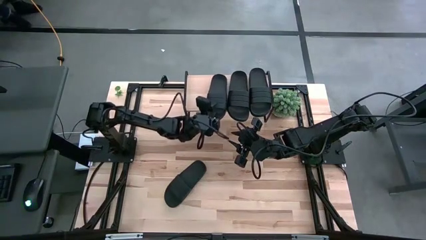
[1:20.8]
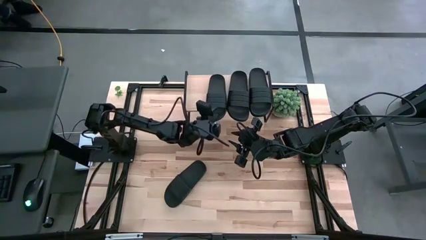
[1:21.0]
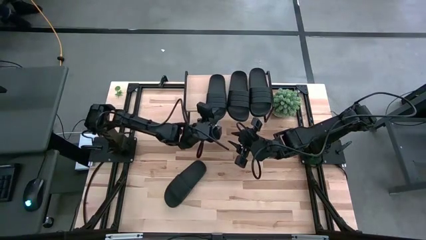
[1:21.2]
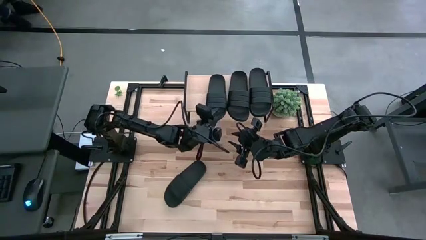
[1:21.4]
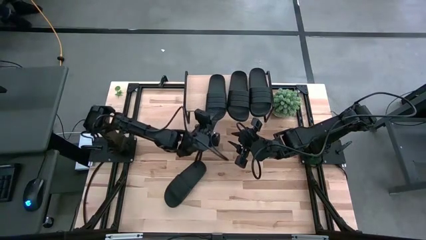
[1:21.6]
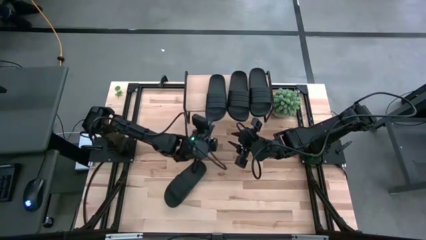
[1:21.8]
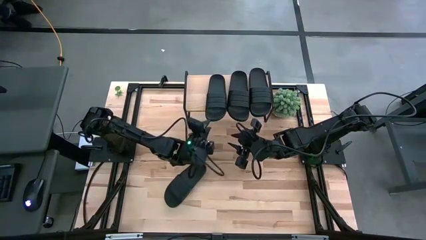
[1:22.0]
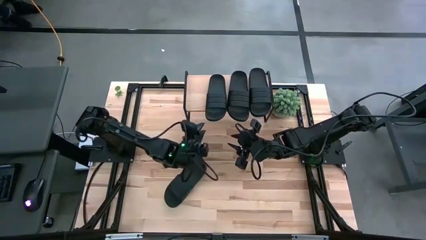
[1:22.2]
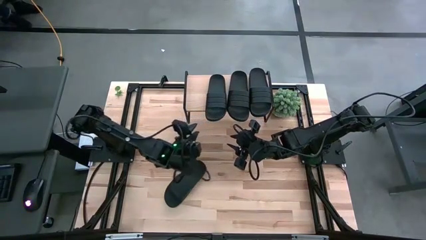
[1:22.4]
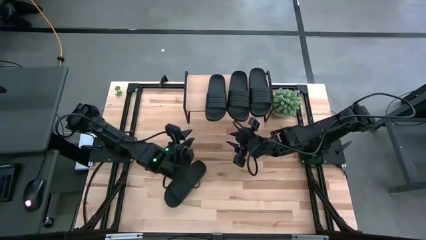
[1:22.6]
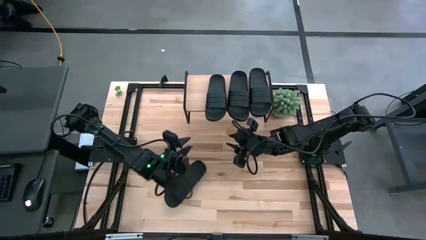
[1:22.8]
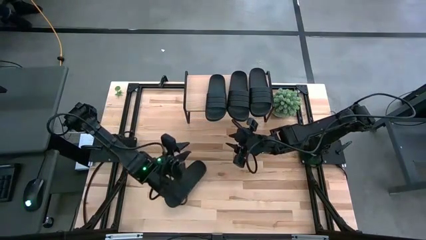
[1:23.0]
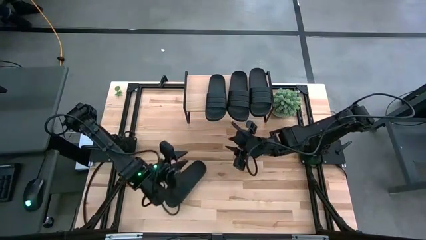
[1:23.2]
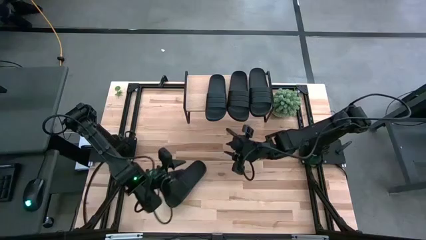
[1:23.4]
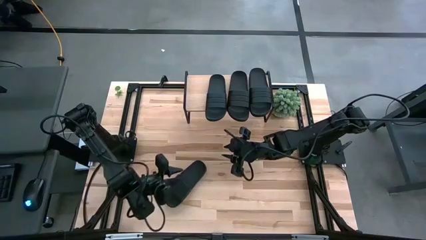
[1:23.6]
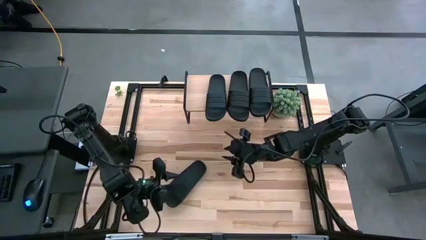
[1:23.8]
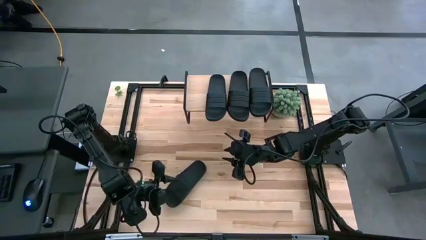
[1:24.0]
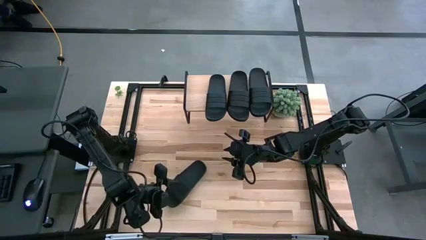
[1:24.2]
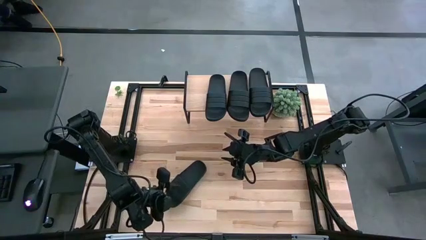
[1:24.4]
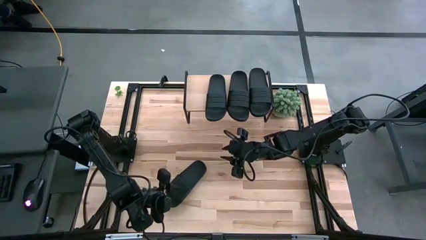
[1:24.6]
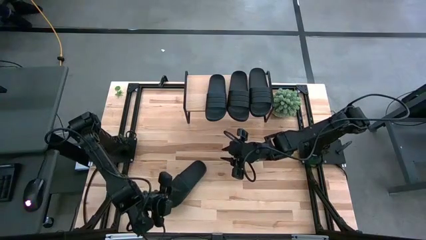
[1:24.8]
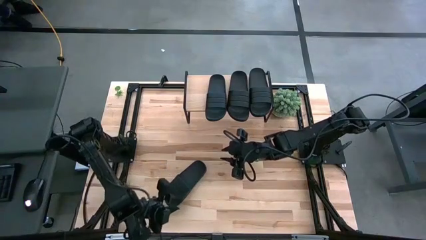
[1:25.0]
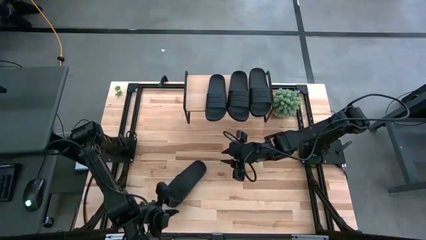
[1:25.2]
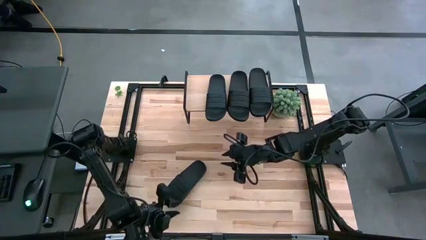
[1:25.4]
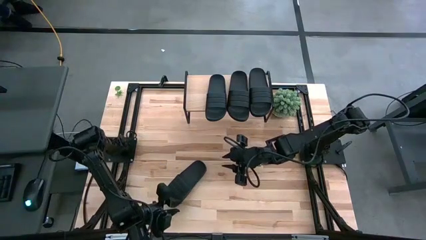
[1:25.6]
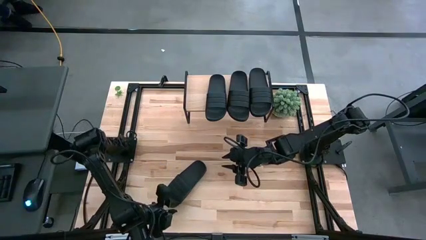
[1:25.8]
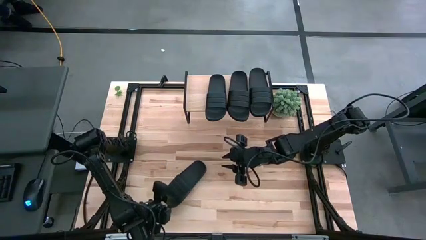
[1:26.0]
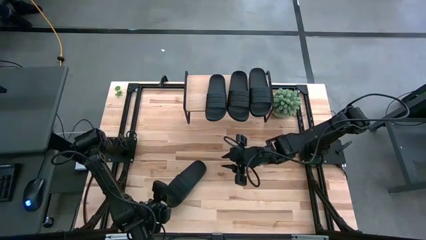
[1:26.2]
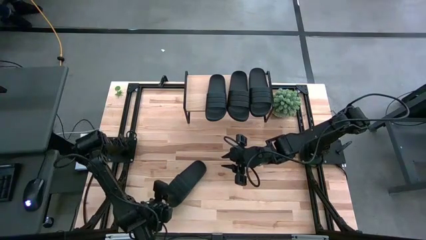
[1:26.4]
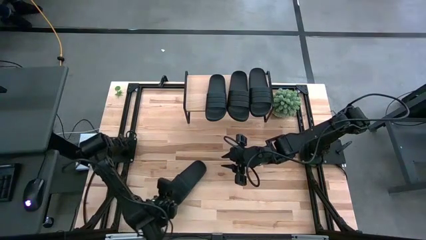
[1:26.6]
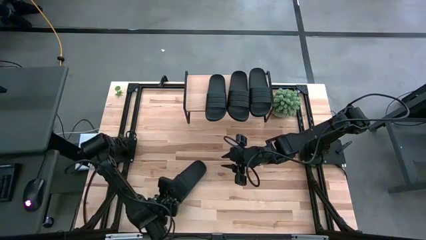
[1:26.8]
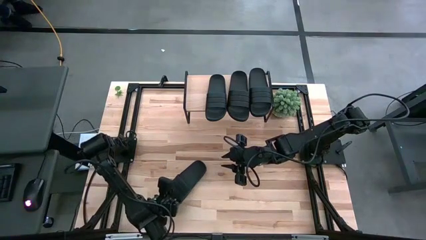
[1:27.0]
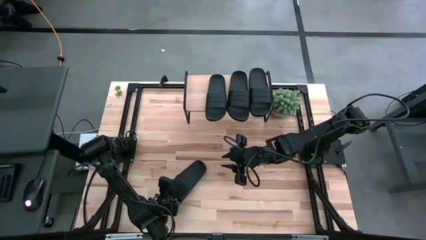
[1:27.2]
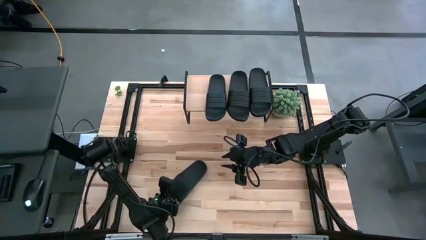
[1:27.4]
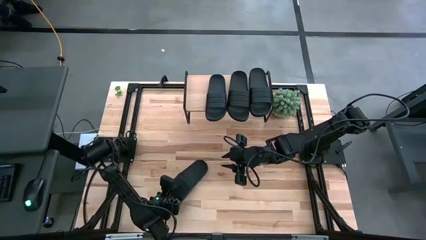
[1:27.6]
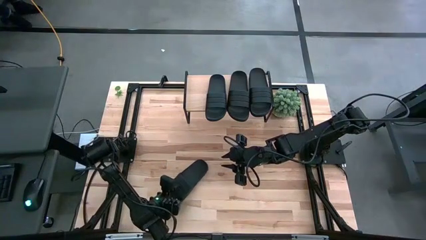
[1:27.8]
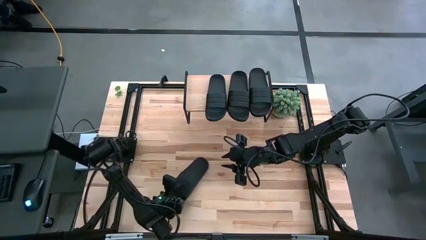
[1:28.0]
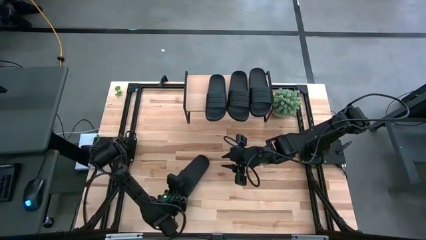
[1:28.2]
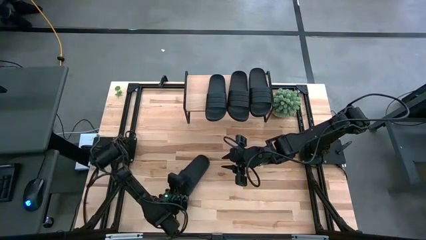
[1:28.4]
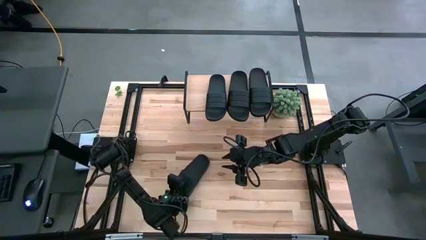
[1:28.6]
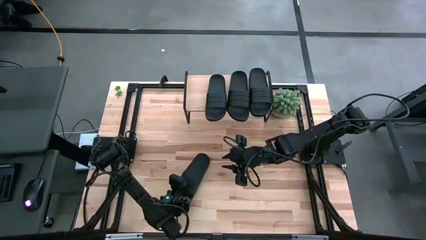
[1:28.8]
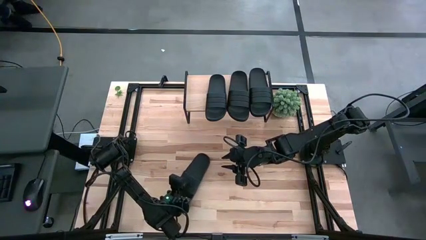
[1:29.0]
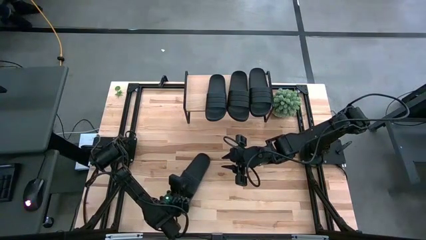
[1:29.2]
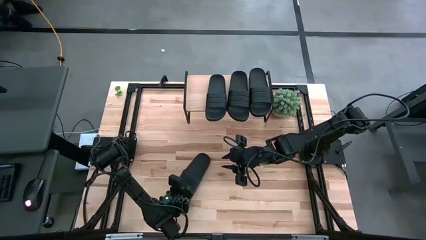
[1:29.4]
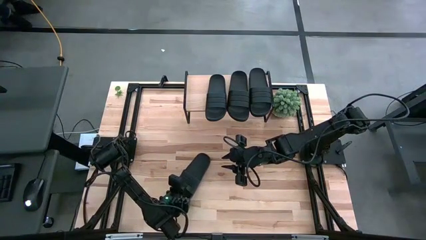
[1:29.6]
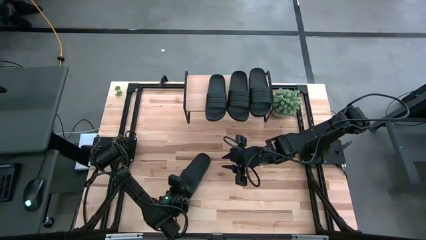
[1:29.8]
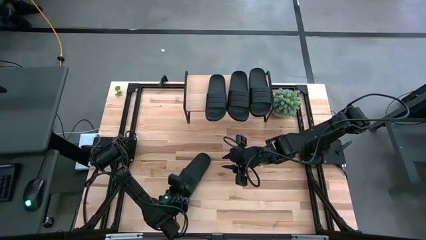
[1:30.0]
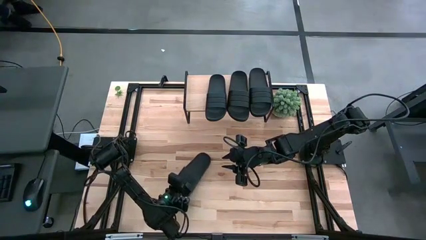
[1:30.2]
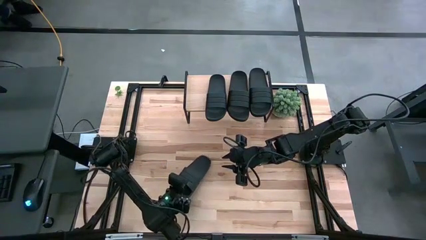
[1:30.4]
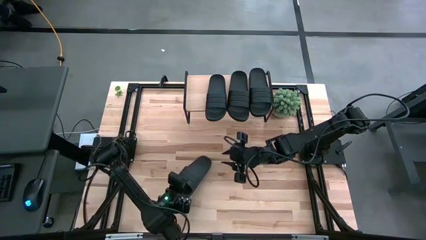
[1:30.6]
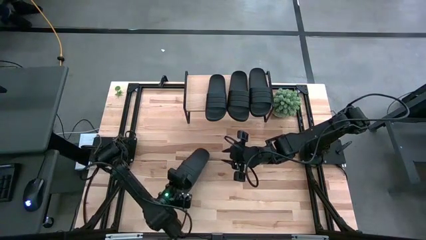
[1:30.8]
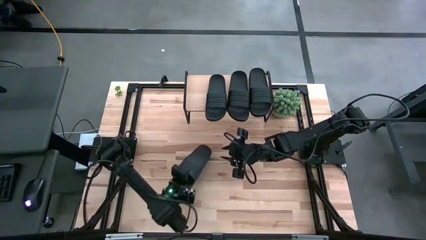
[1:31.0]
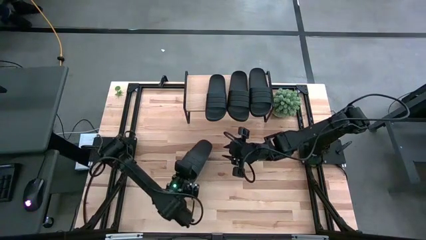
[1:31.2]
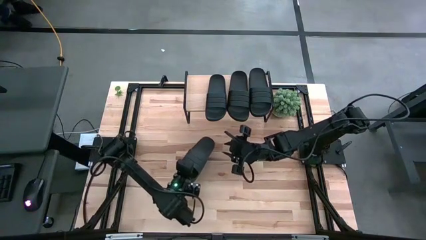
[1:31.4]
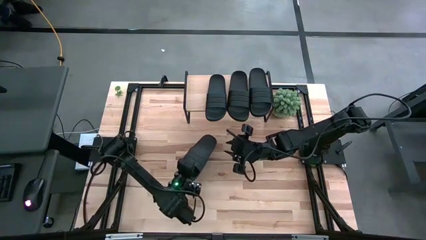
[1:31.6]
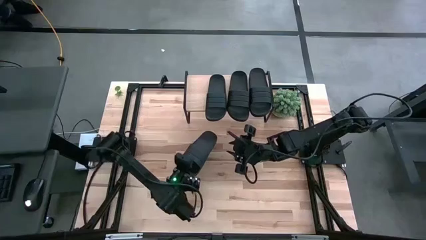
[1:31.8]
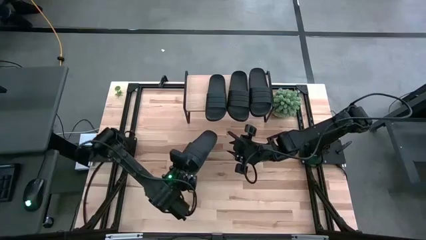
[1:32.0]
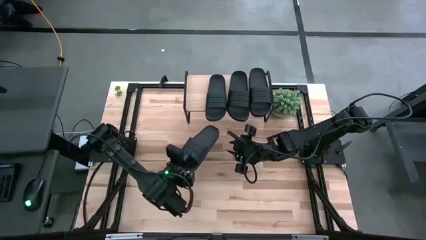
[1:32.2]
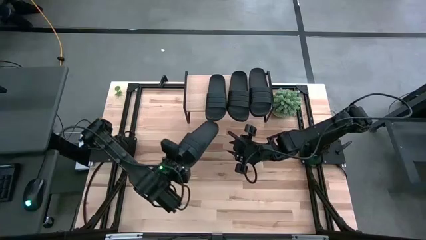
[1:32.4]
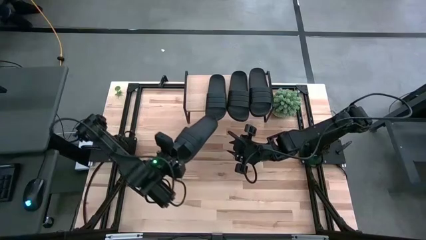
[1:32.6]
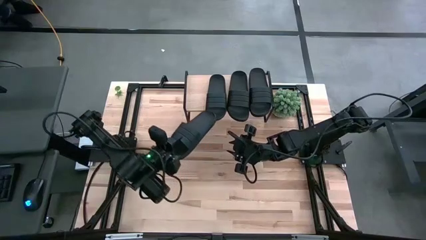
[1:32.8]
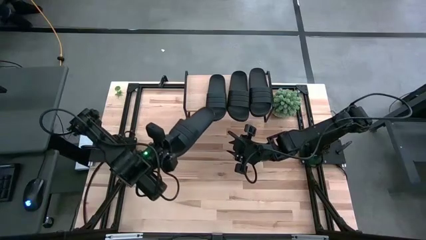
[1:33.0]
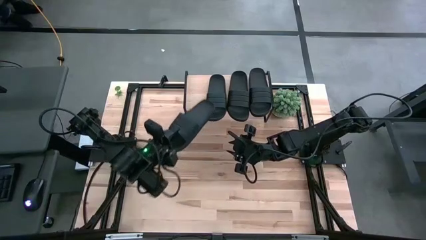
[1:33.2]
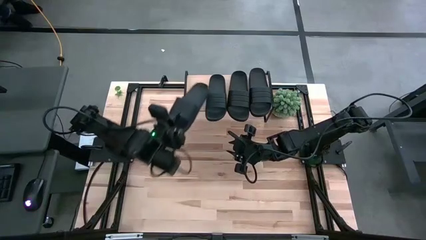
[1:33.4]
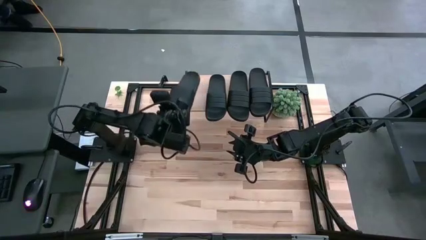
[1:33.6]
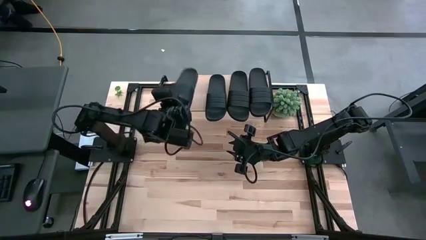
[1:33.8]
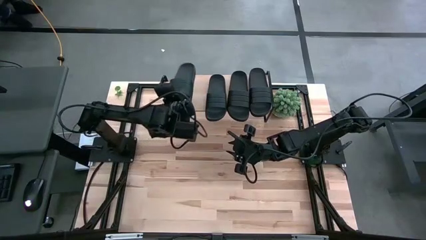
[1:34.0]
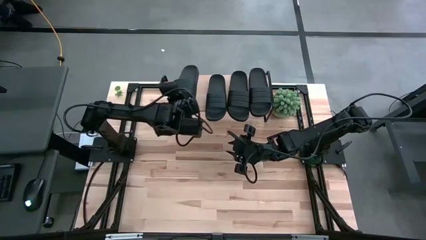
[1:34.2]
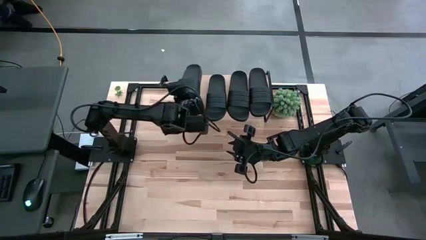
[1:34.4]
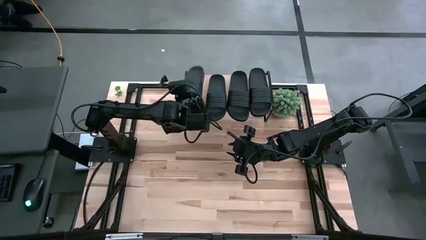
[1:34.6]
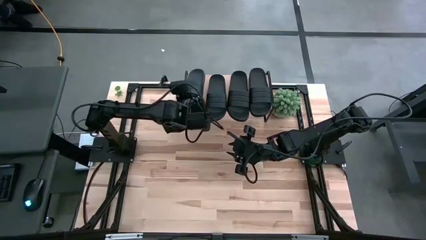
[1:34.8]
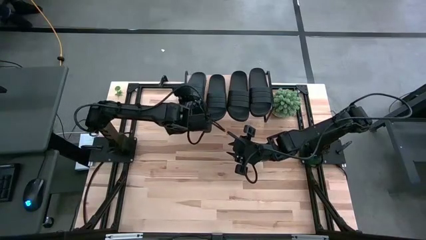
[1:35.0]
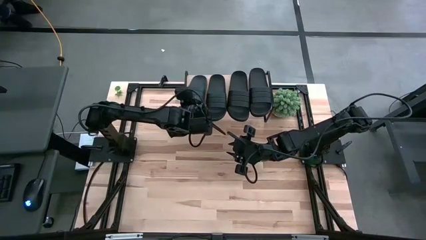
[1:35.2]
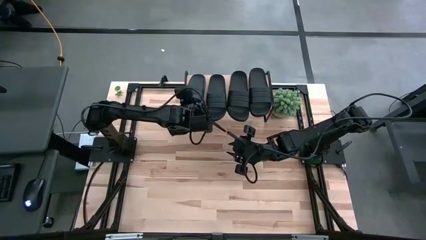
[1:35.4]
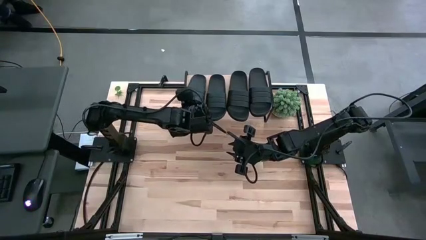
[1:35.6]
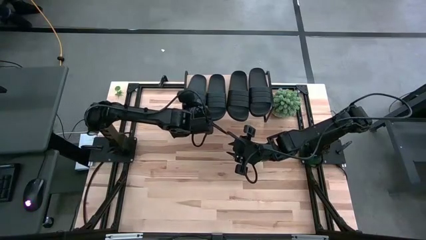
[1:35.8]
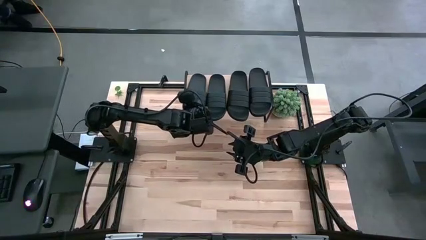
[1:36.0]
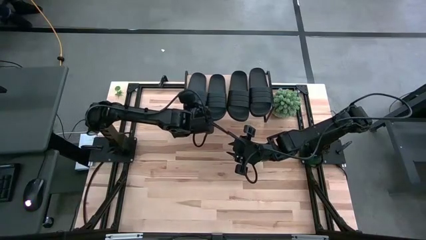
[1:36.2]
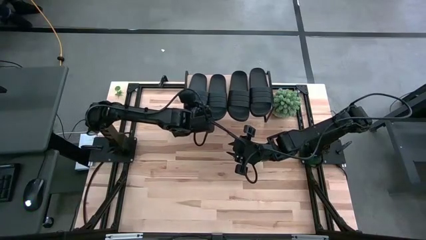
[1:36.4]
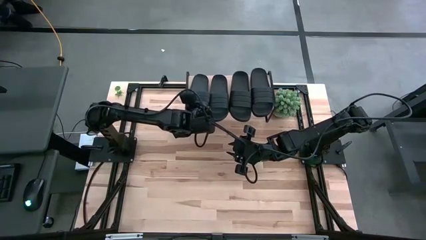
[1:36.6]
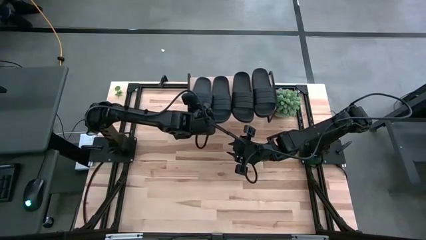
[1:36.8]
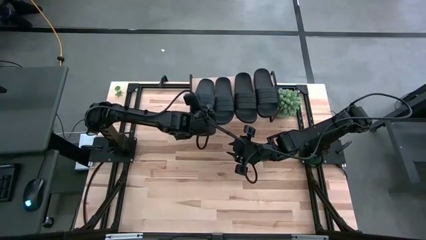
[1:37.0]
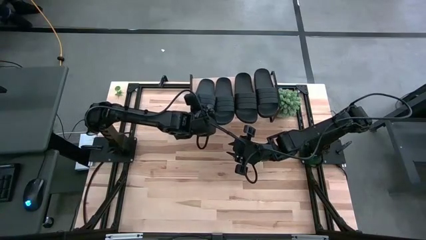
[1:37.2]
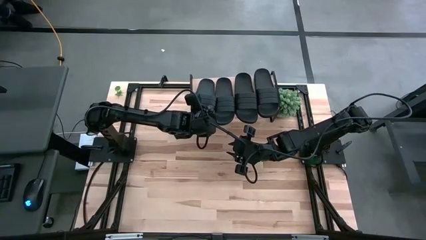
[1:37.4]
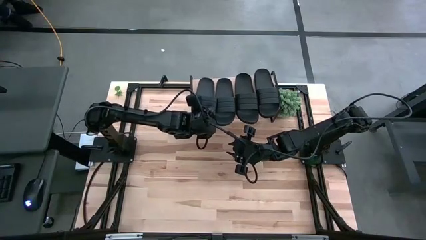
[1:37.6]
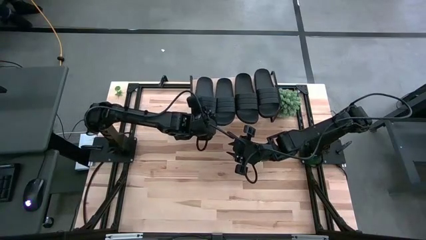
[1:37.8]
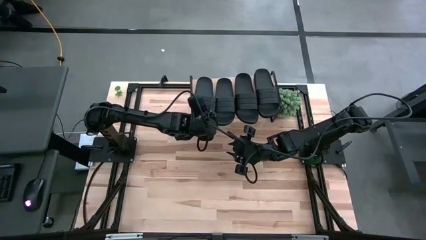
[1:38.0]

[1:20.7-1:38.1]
Task: Pick and place slides into the shelf
Put the black slipper on the shelf
